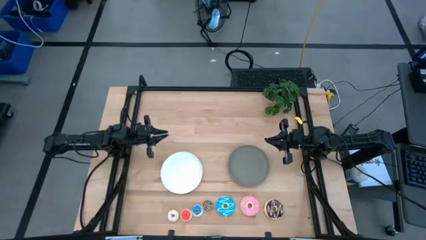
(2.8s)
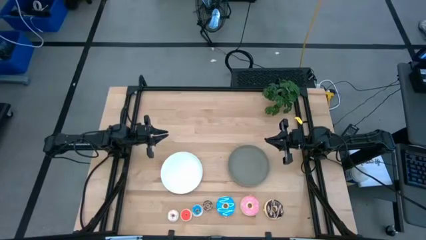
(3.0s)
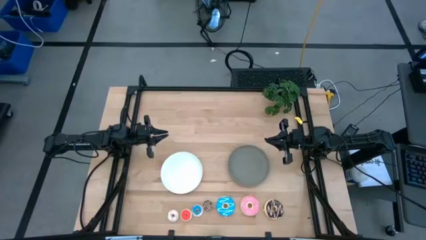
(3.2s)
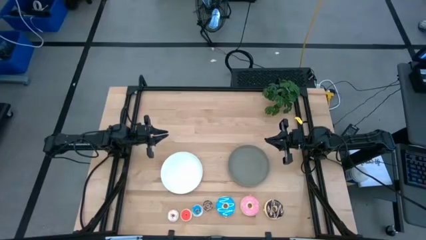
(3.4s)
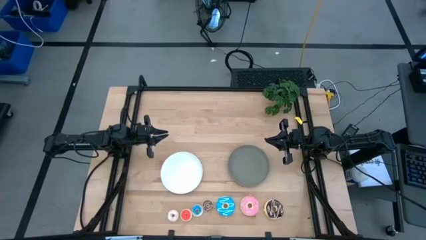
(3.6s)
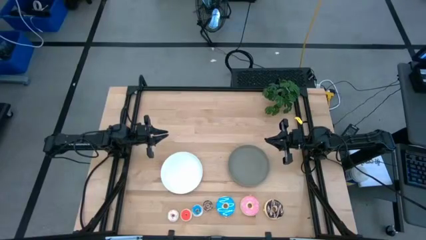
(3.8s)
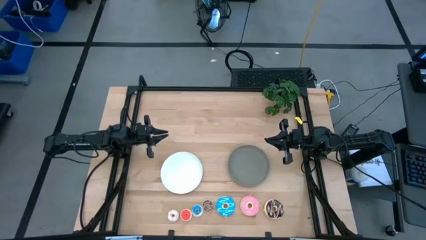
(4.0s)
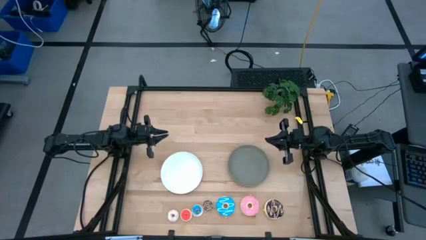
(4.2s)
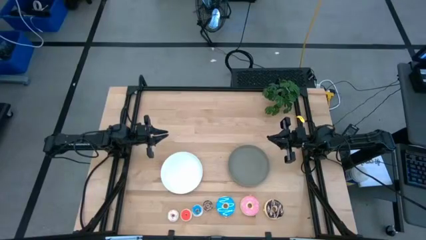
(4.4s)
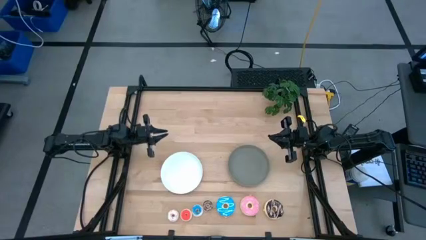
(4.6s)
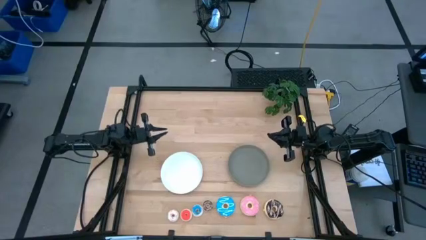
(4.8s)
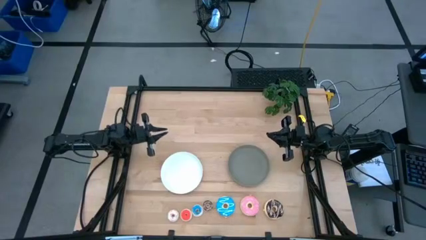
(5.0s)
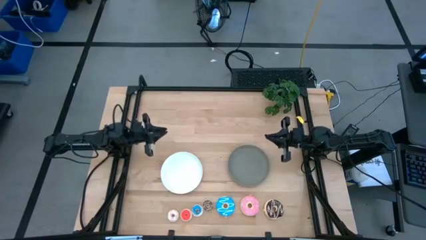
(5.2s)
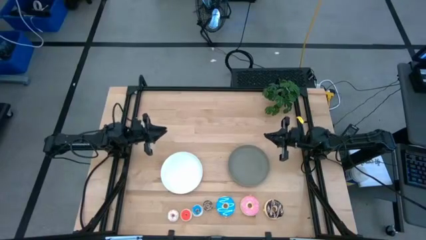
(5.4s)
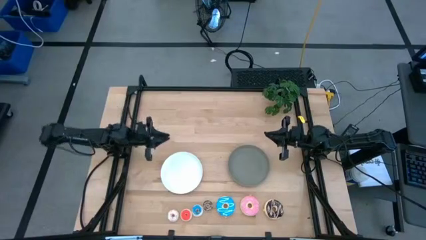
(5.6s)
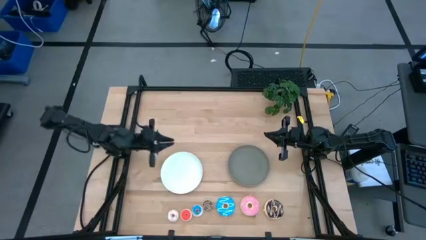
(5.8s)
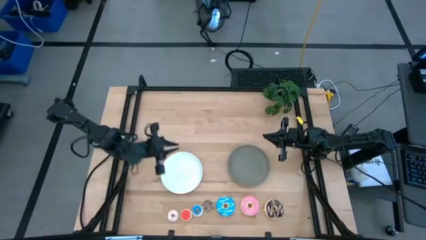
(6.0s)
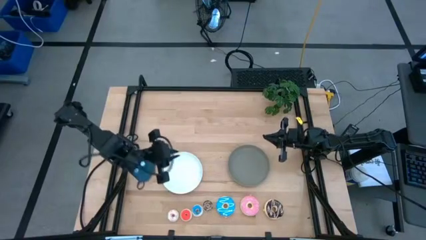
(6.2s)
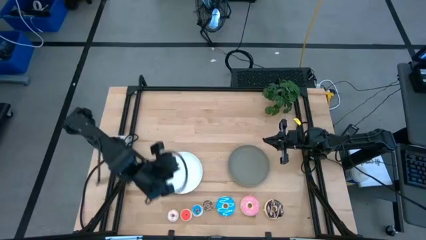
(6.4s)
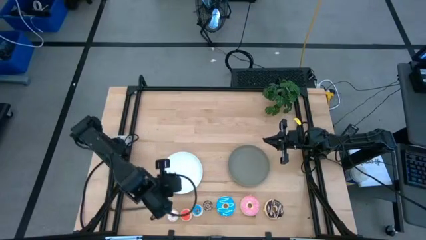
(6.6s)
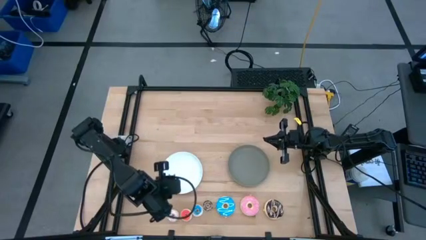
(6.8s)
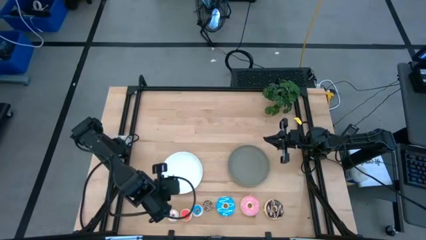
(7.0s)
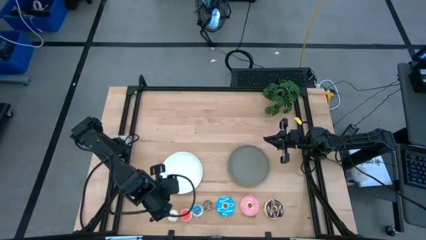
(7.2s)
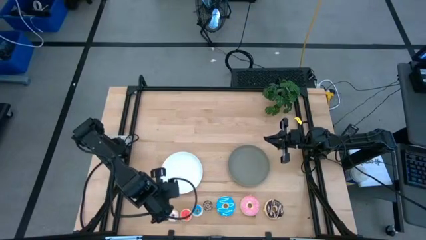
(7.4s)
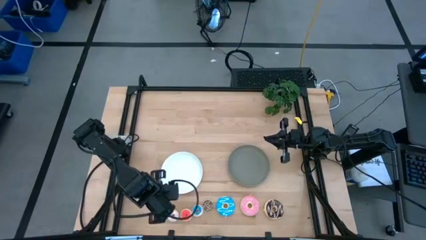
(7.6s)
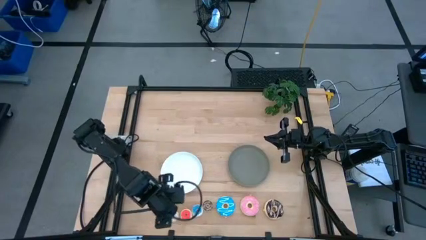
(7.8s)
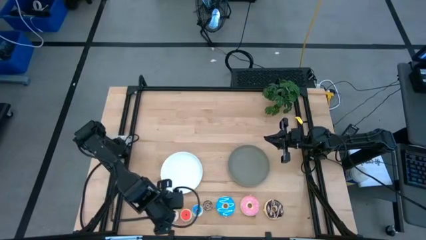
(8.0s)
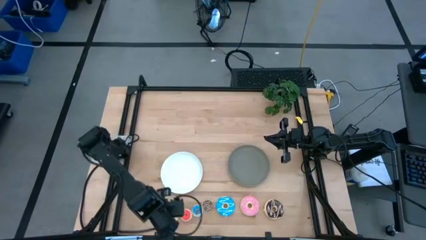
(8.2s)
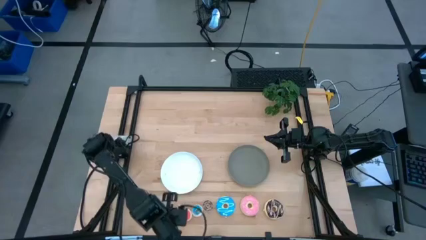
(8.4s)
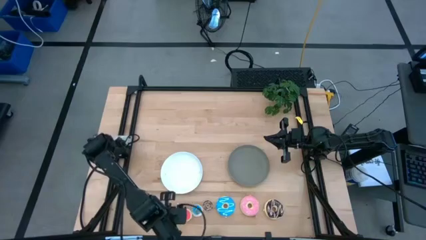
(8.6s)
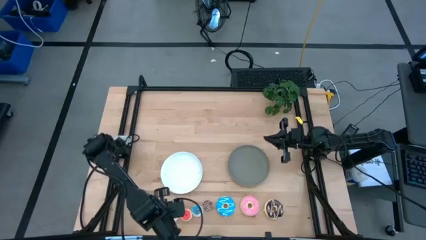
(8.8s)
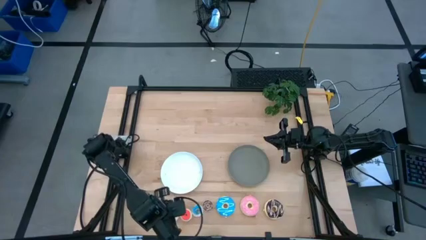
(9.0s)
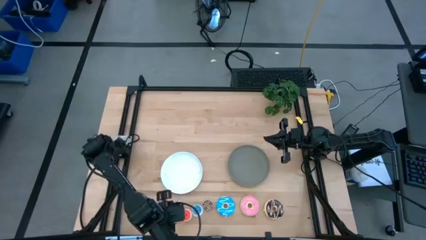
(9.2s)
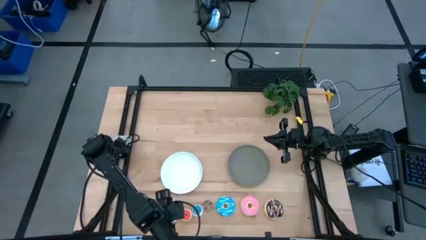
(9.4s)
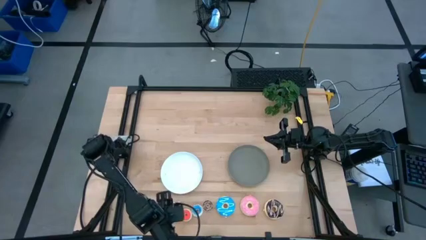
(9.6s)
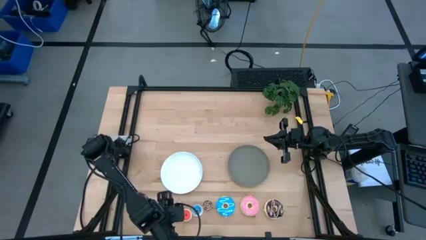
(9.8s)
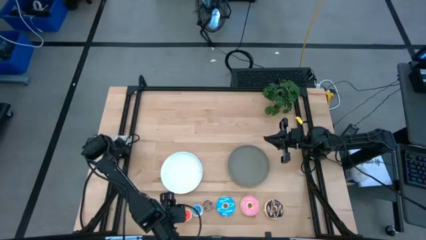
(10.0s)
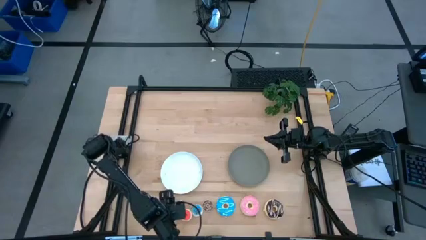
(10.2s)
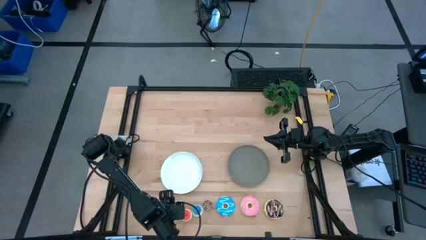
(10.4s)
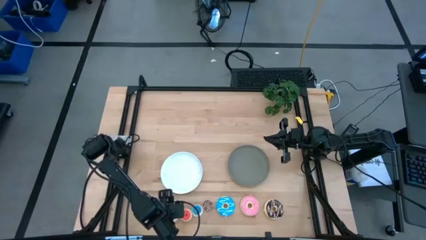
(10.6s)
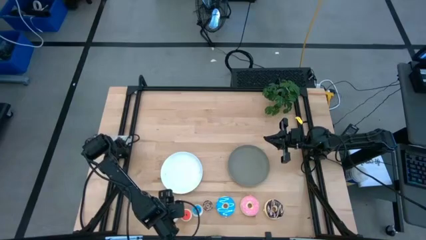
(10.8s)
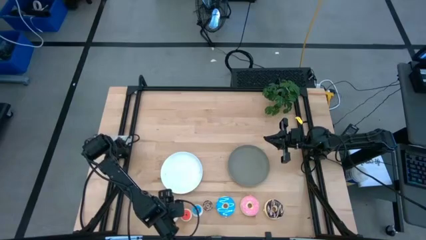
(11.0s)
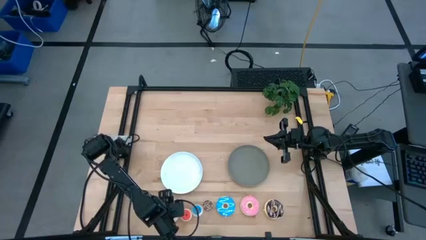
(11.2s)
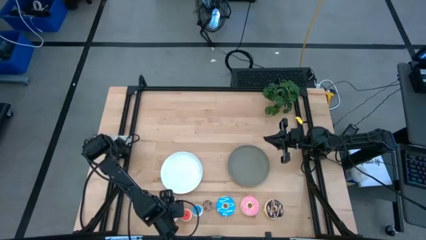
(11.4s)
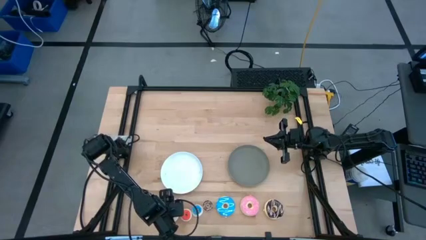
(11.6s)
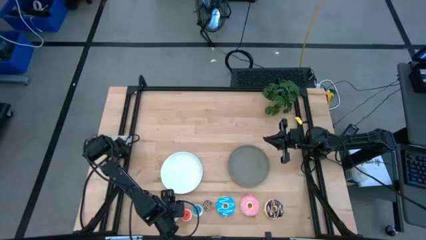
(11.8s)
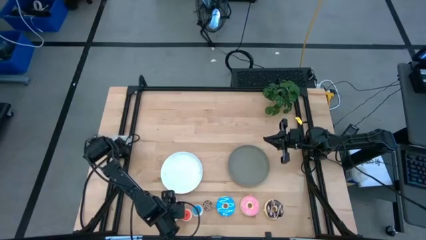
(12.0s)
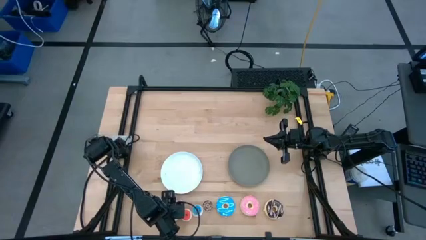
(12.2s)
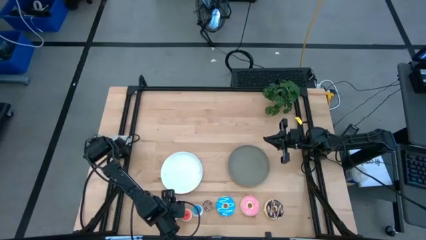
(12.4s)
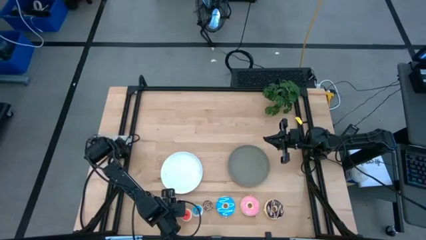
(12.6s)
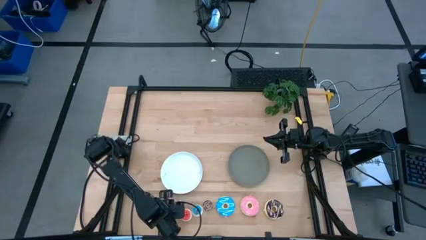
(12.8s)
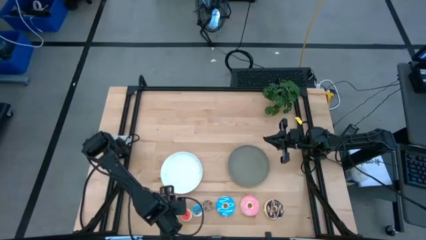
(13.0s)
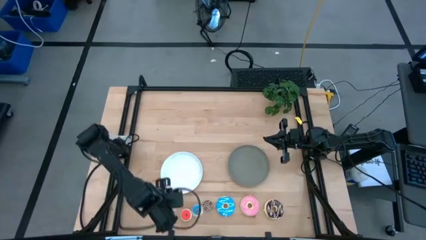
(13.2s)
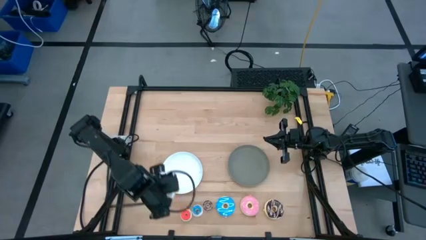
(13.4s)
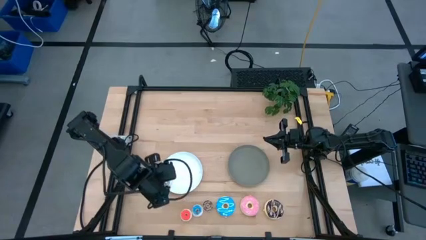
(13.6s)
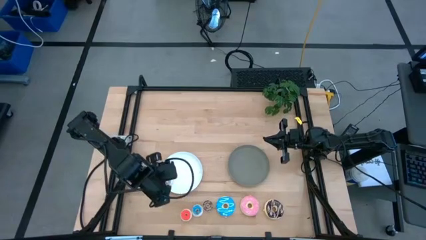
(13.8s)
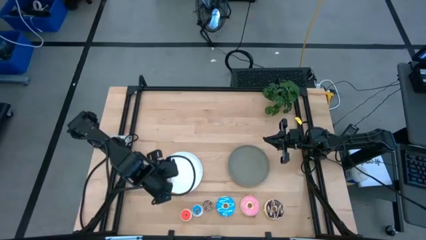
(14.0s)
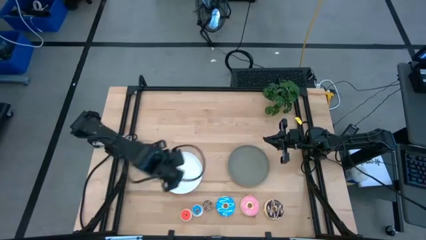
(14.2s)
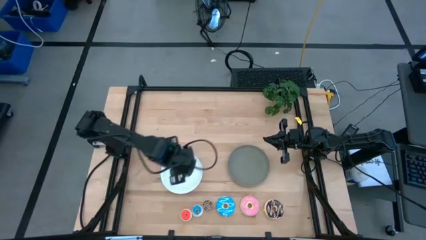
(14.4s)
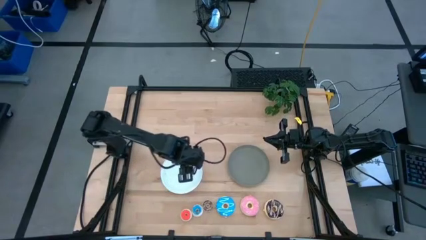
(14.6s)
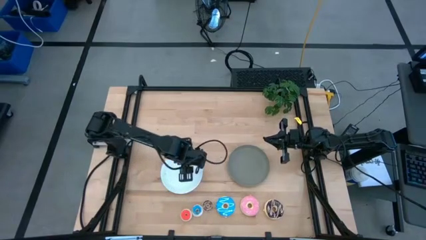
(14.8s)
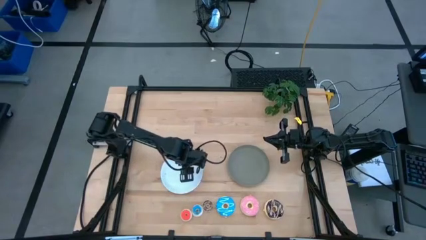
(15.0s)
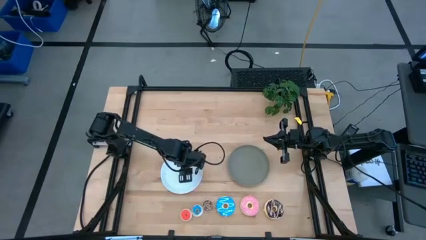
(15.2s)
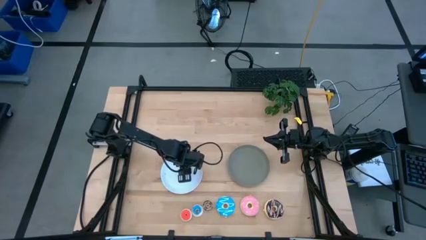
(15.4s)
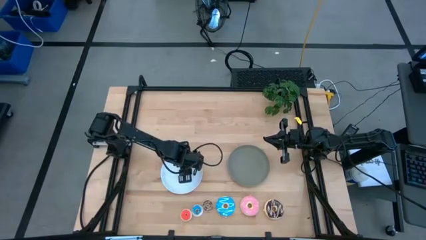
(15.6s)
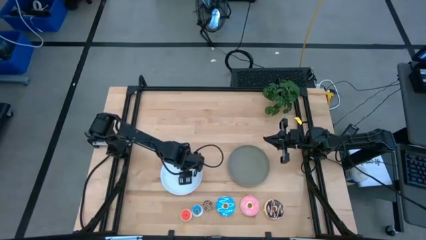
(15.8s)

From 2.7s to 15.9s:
Task: Pick & Place donuts
Put the small white donut on the white plate
